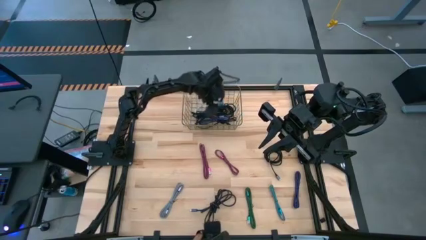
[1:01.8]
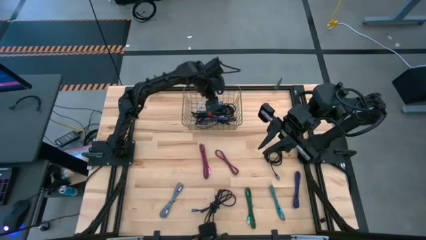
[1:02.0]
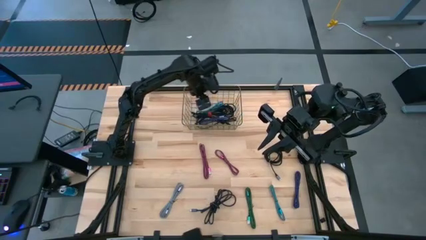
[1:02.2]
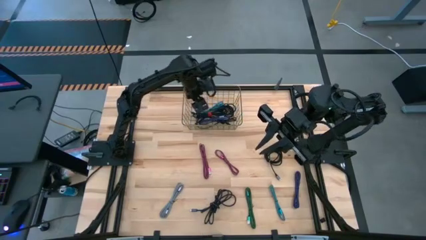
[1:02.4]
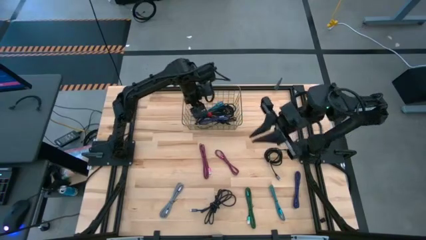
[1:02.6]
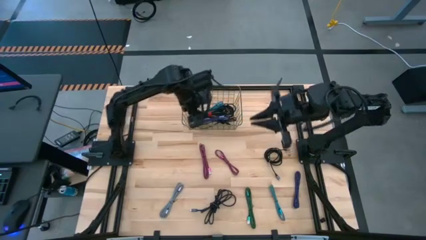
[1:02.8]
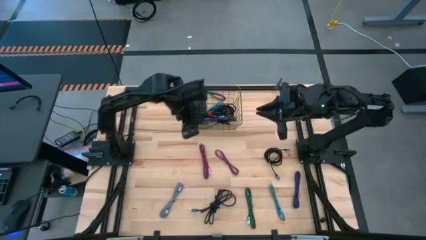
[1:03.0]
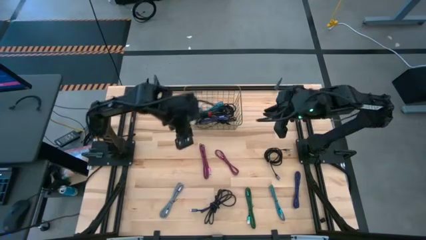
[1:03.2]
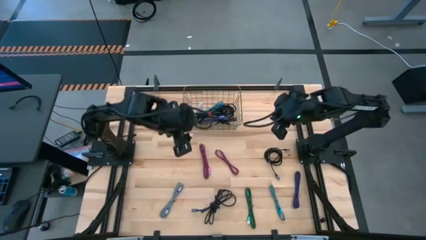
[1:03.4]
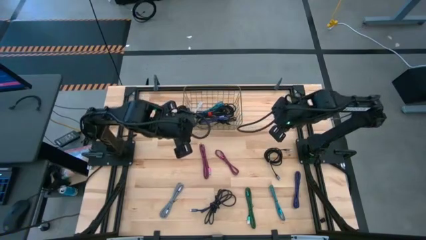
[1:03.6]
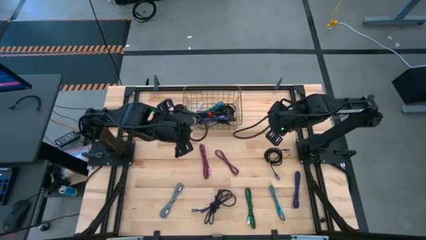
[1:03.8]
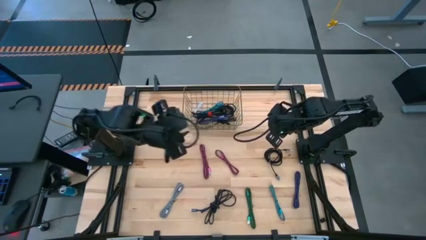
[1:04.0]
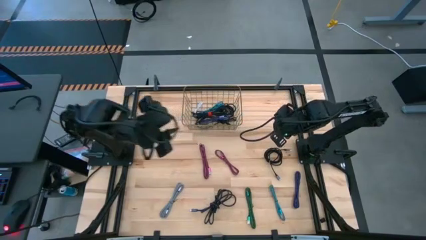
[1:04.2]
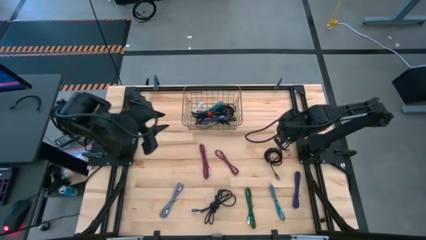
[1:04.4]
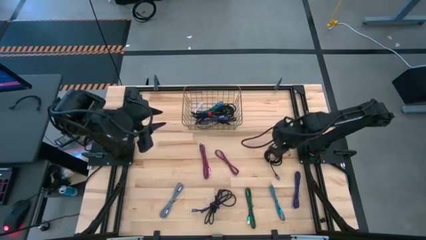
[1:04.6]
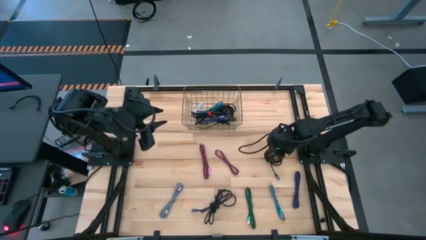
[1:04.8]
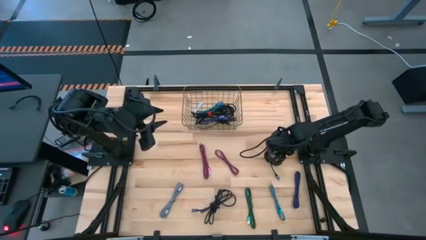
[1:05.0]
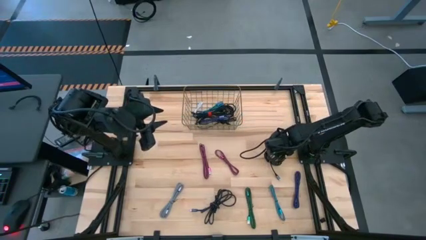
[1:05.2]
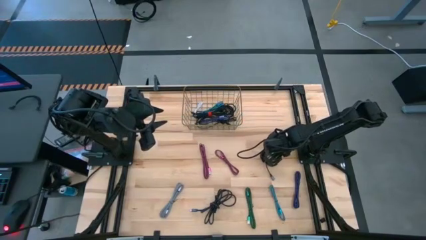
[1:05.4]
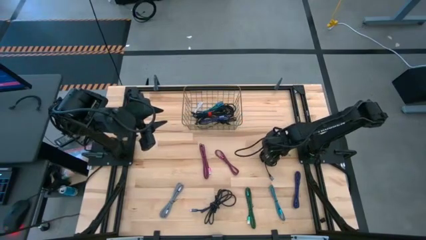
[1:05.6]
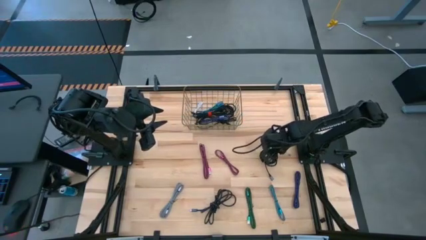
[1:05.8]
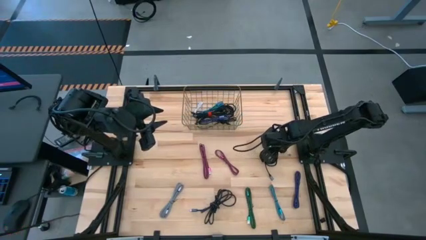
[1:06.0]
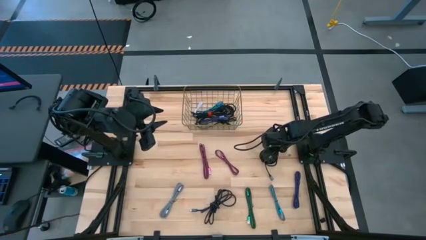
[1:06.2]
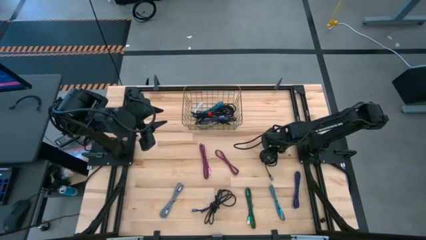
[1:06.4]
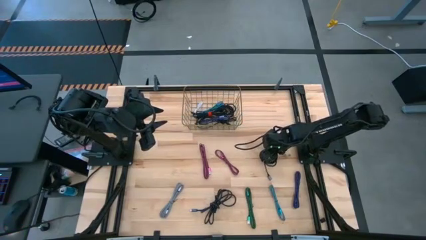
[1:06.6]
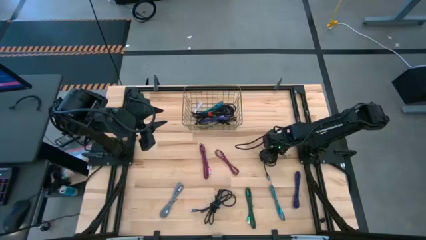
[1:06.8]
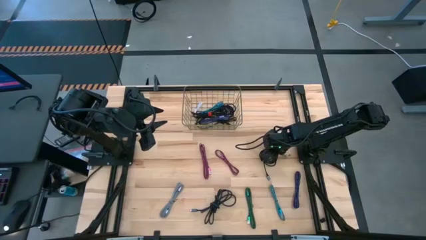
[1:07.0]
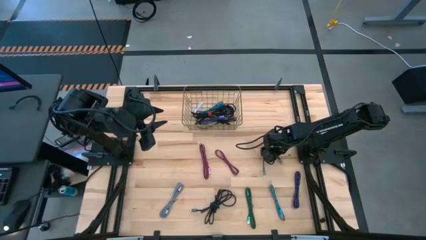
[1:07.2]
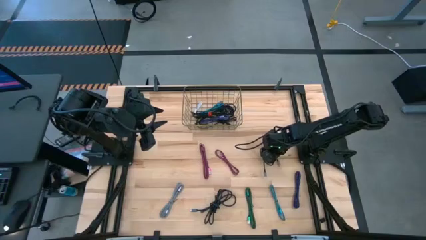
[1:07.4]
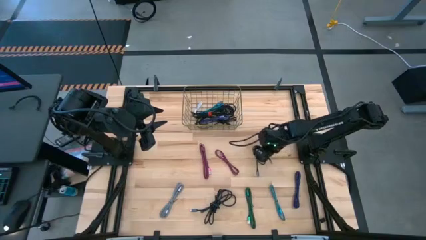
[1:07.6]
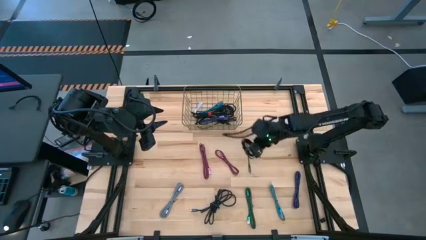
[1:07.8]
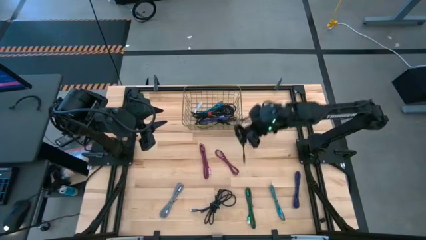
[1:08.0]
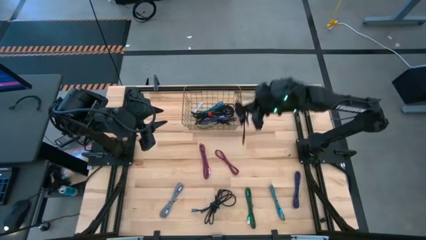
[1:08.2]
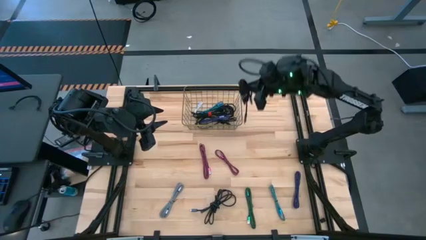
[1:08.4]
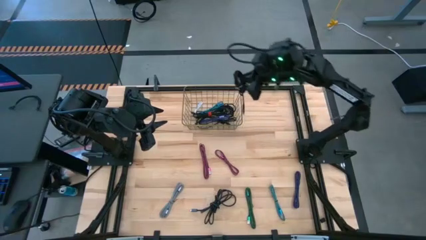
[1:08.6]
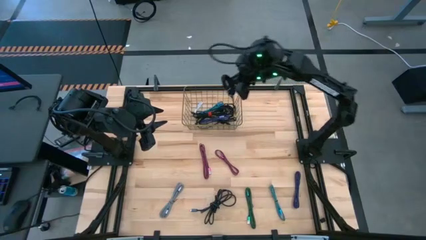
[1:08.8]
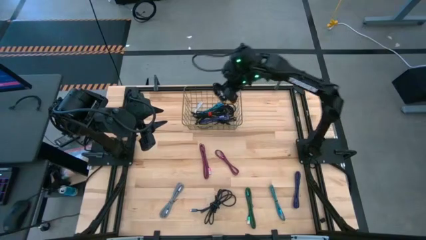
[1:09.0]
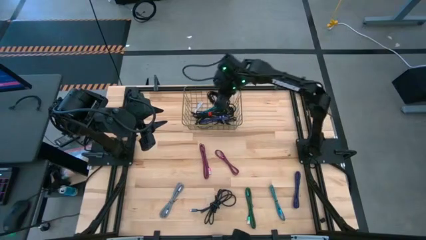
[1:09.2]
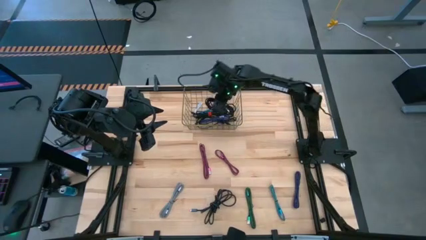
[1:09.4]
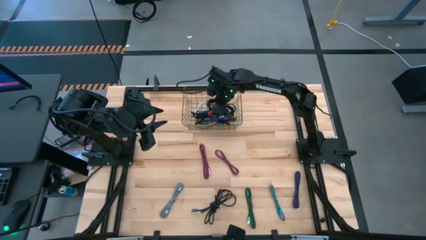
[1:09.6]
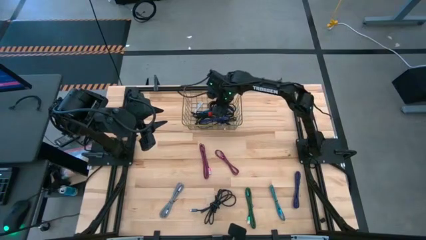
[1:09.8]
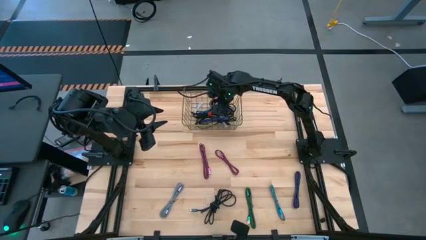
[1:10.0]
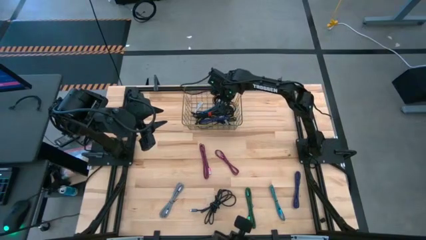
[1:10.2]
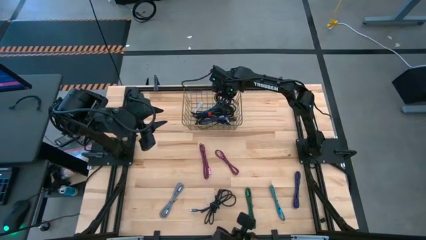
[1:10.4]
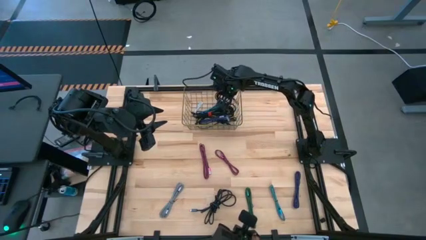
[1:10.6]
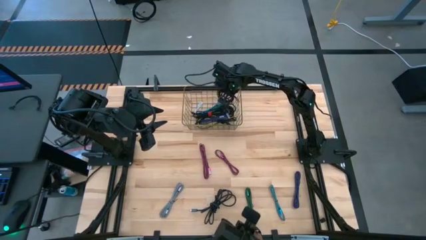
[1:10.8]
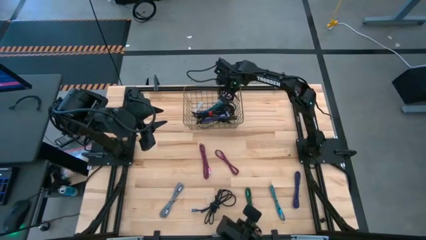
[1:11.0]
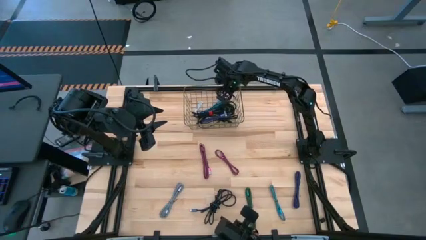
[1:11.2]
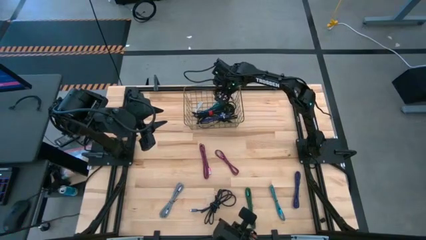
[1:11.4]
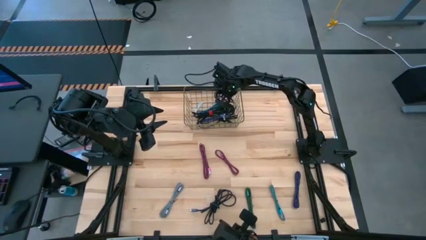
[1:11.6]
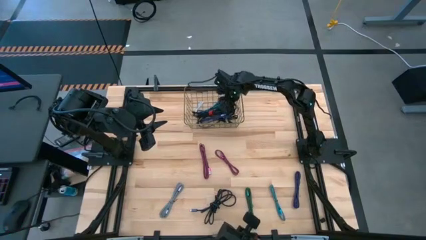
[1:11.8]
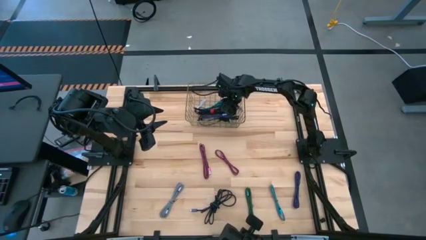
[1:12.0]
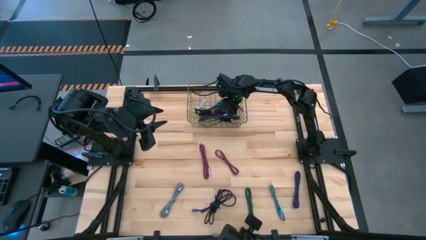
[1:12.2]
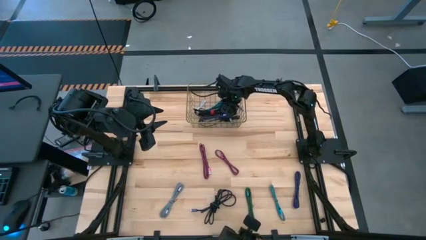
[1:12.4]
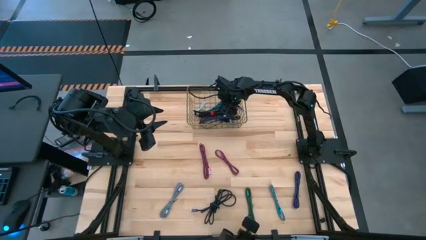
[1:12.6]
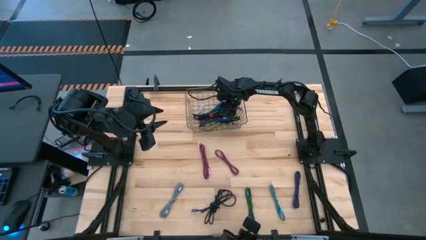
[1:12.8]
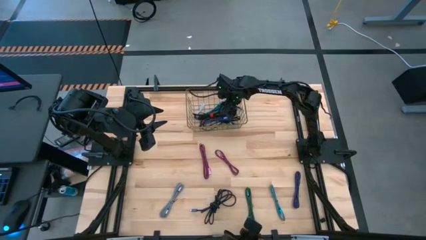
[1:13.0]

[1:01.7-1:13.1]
Task: Pick and place USB-C Cables
Put the black charger cable into the wire basket

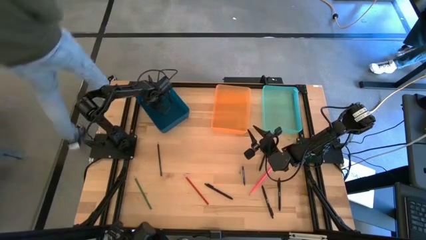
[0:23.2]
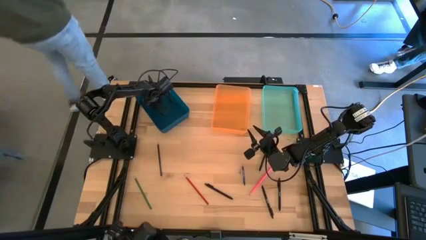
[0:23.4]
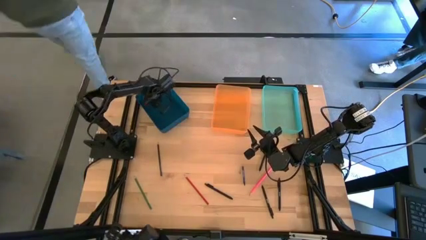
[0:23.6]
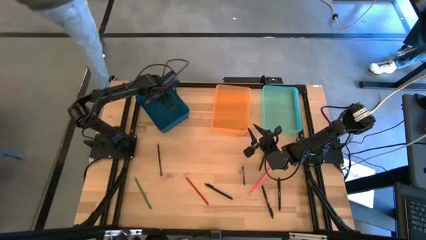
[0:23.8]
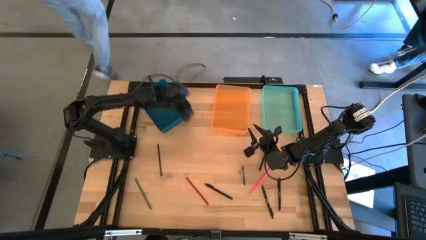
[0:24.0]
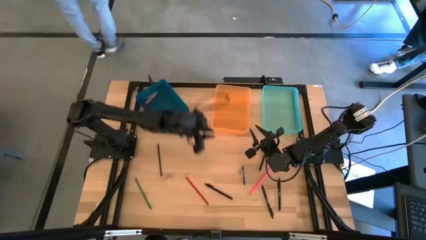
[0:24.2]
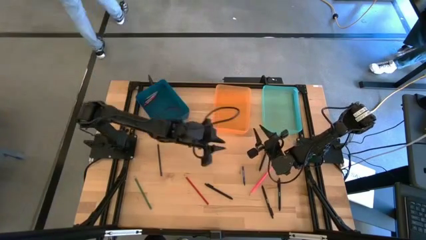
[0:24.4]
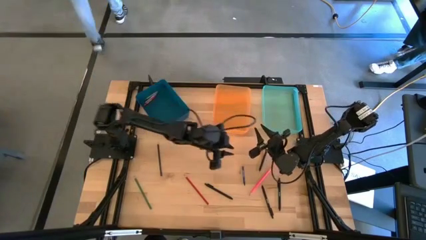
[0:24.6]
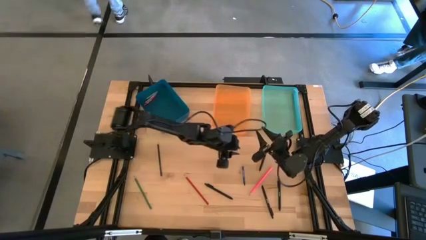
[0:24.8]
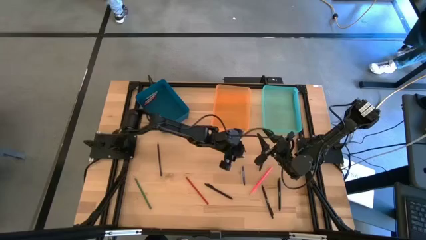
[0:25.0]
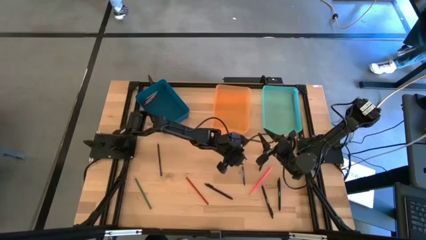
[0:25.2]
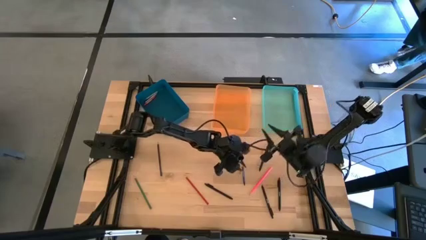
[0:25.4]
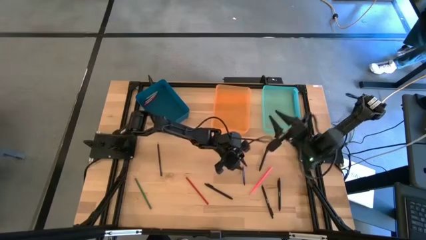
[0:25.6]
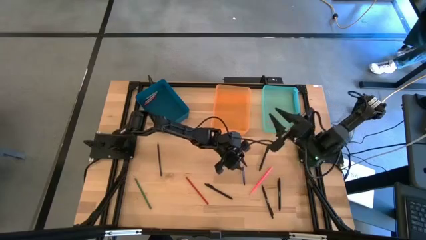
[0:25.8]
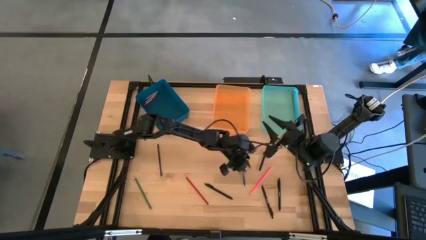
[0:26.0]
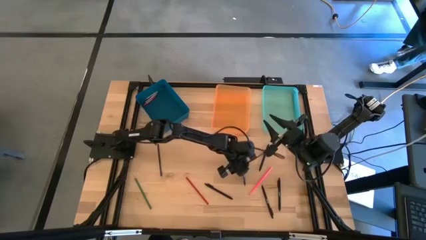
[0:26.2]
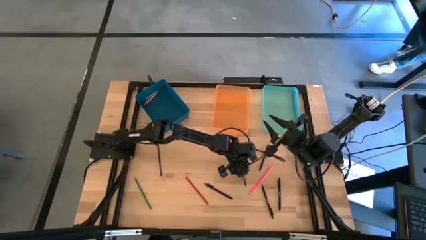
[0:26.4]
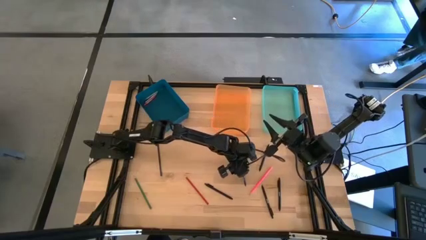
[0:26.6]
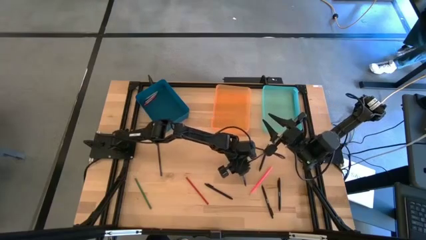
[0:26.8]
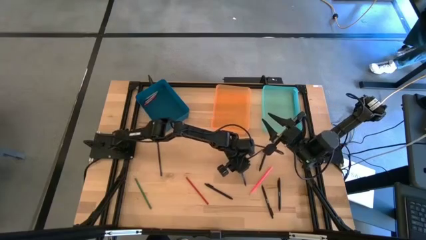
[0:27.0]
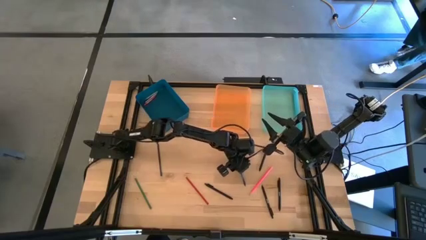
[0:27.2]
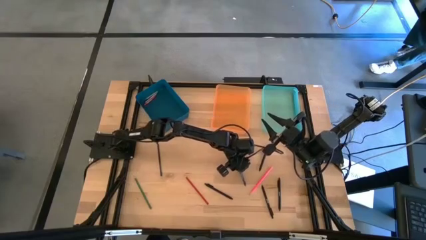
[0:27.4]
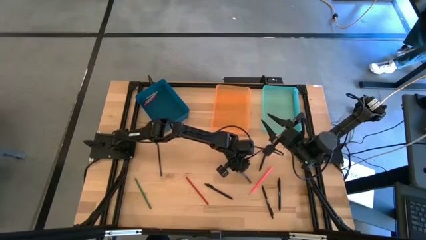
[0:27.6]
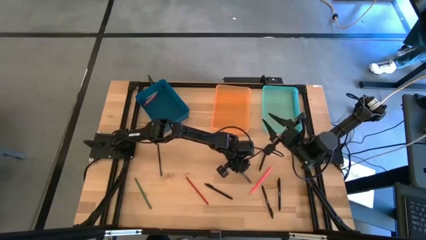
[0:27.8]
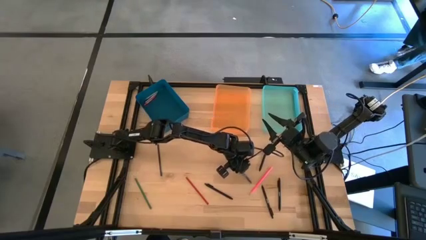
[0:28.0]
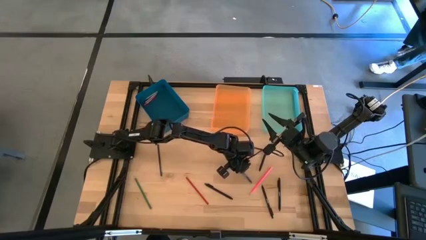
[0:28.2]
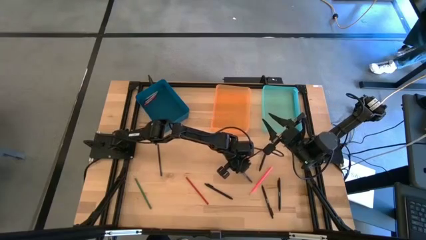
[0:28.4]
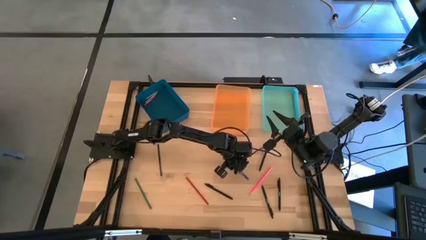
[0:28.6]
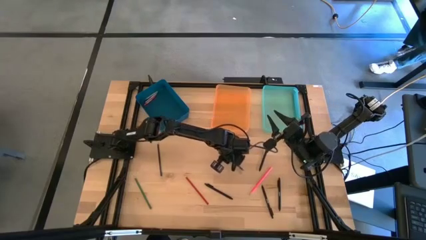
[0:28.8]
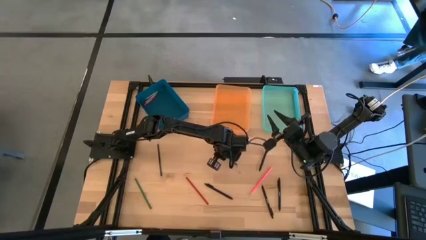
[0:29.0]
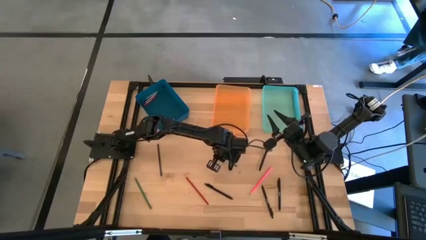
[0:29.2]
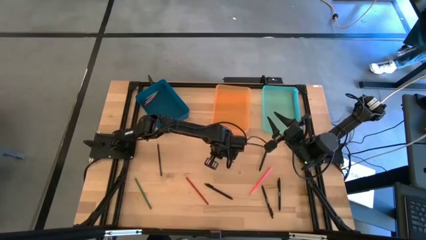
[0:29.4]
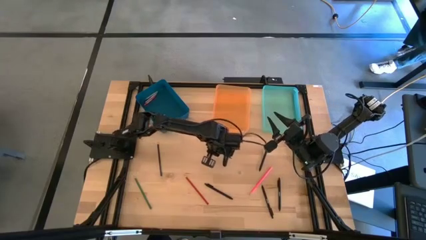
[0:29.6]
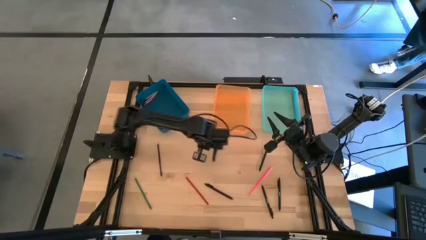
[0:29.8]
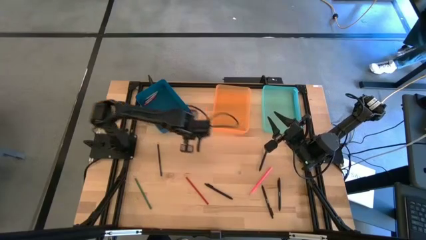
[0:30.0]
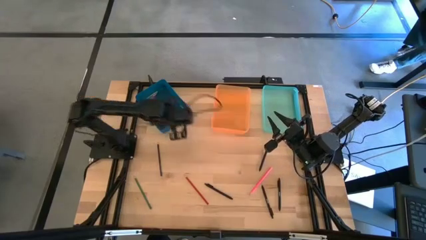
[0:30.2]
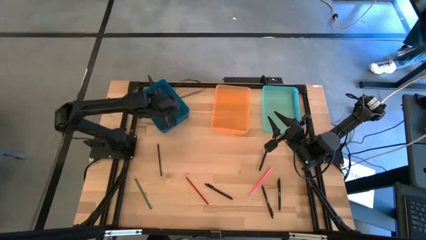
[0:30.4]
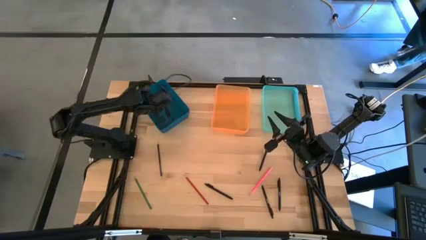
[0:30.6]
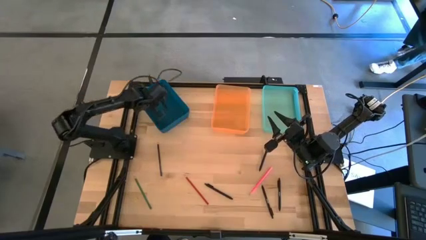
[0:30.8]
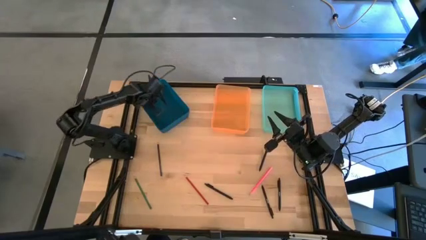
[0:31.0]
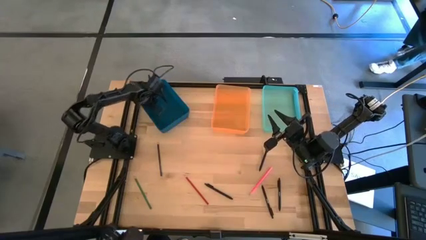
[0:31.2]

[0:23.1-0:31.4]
Task: Sort crayons/erasers/pens/pencils in bins
Put the blue crayon into the blue bin
